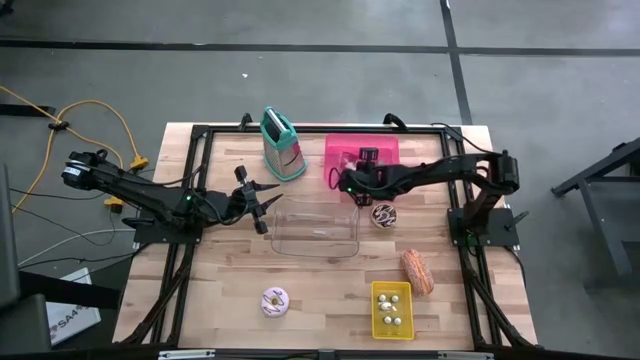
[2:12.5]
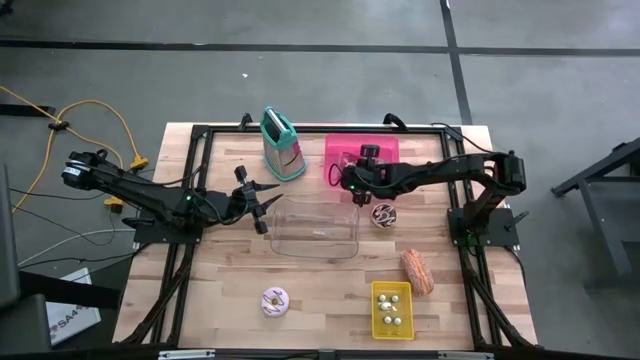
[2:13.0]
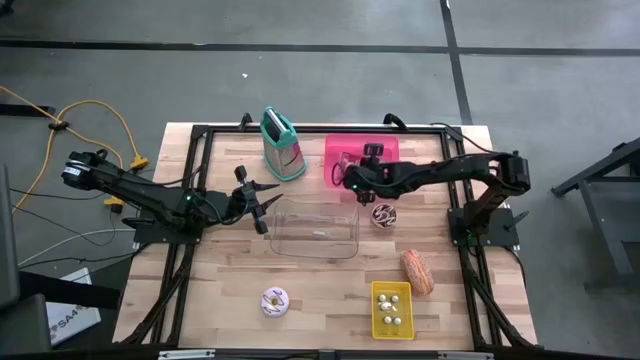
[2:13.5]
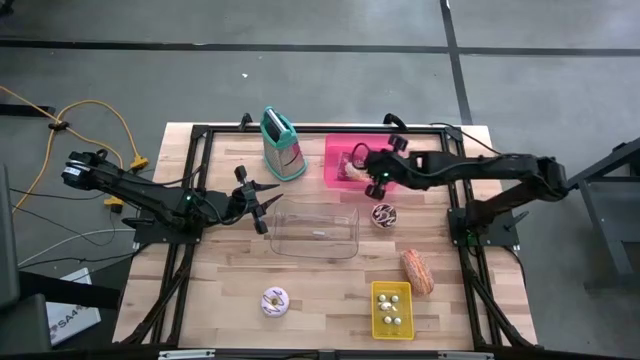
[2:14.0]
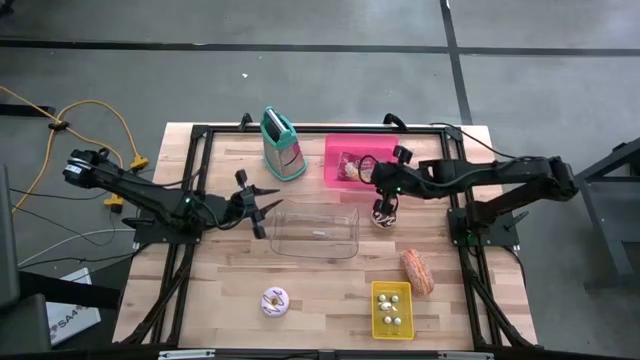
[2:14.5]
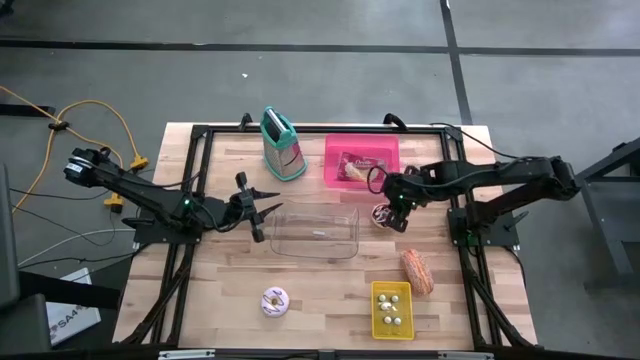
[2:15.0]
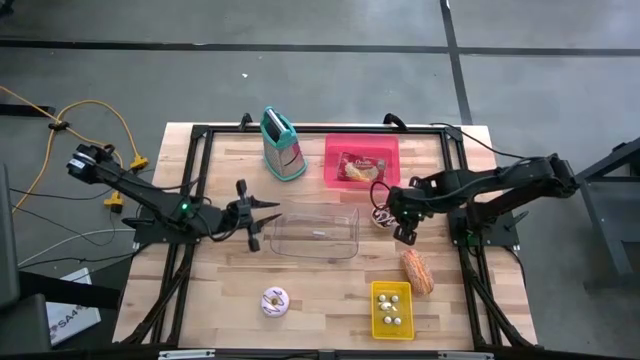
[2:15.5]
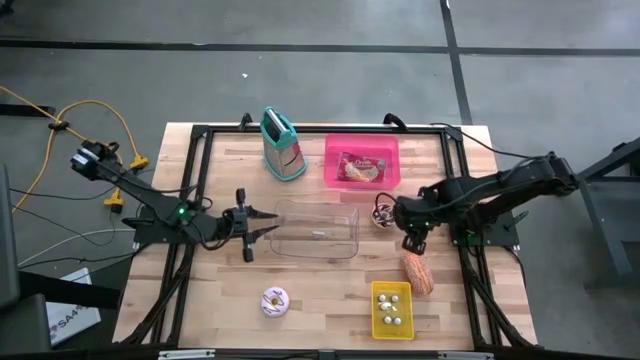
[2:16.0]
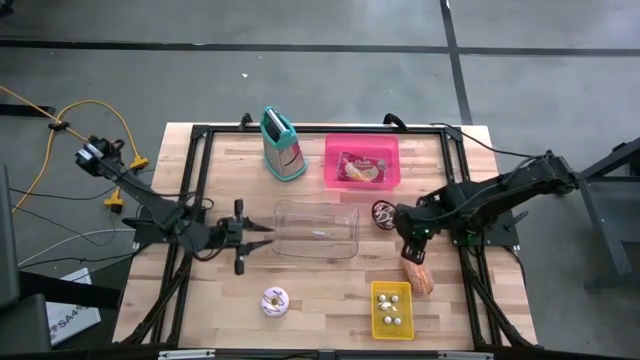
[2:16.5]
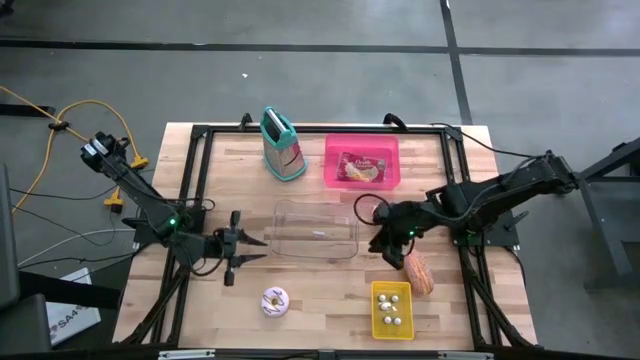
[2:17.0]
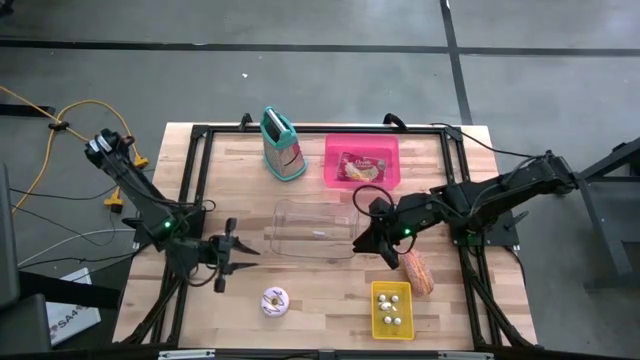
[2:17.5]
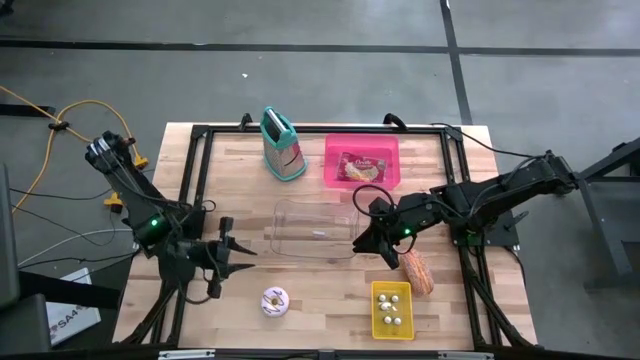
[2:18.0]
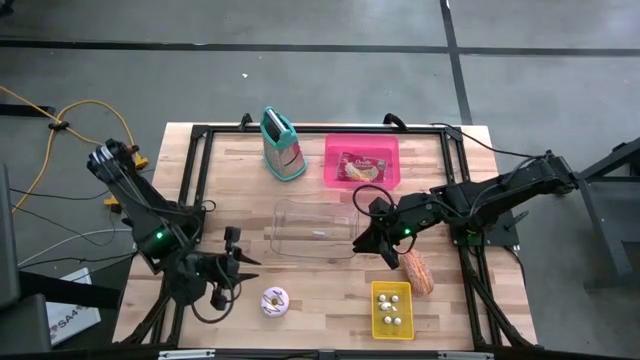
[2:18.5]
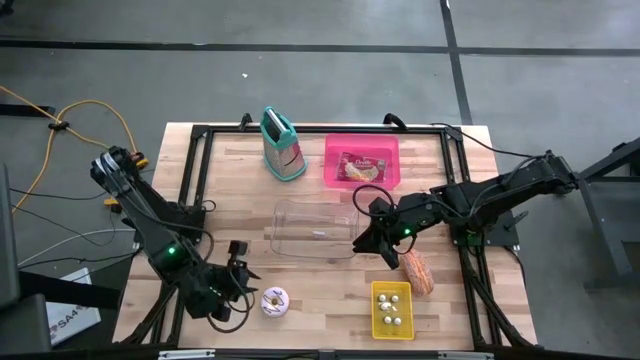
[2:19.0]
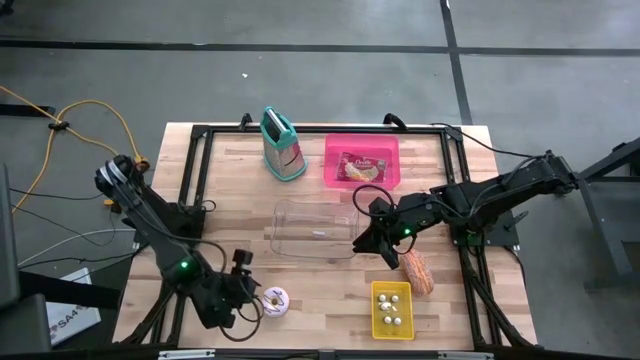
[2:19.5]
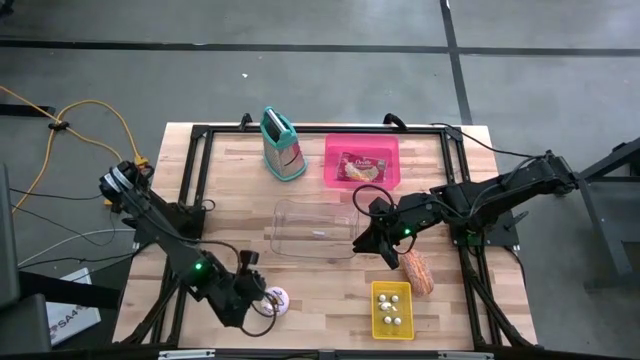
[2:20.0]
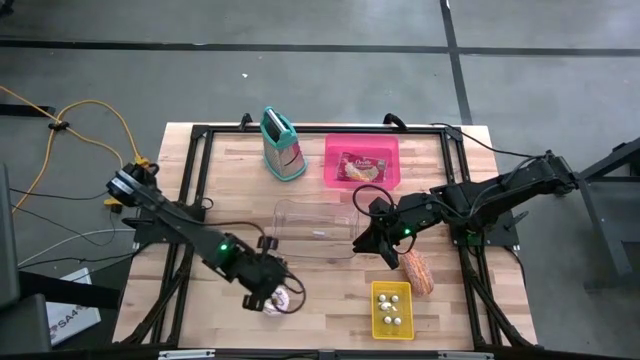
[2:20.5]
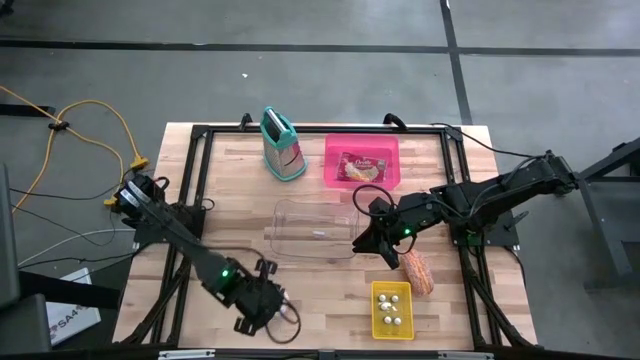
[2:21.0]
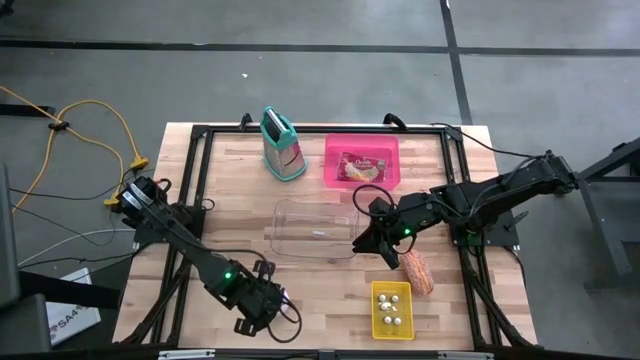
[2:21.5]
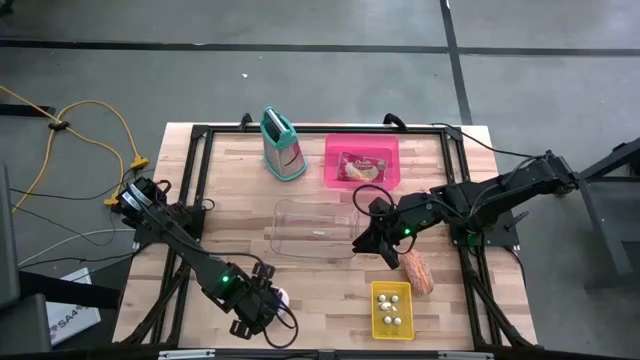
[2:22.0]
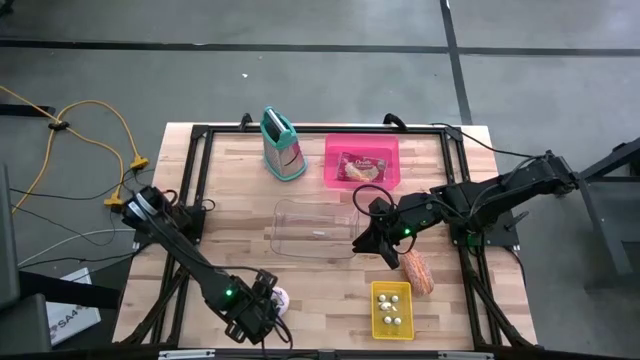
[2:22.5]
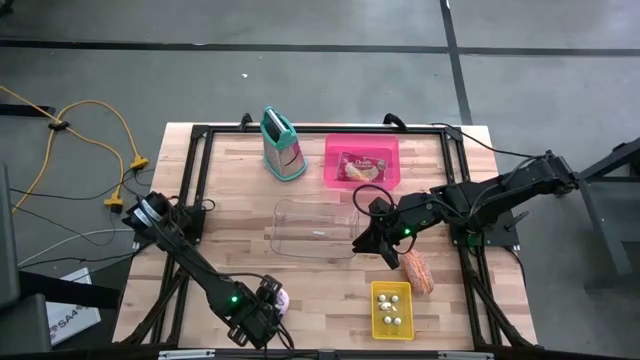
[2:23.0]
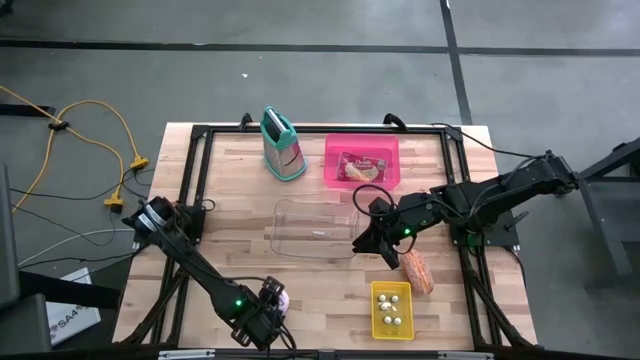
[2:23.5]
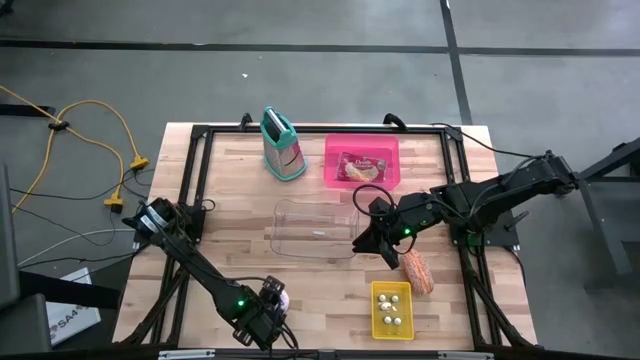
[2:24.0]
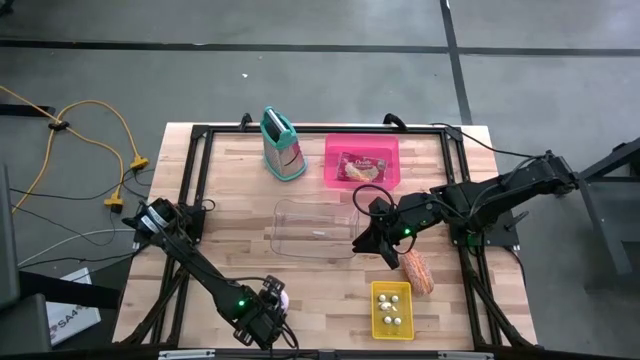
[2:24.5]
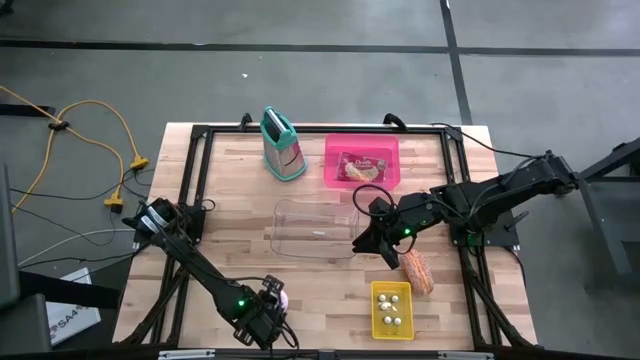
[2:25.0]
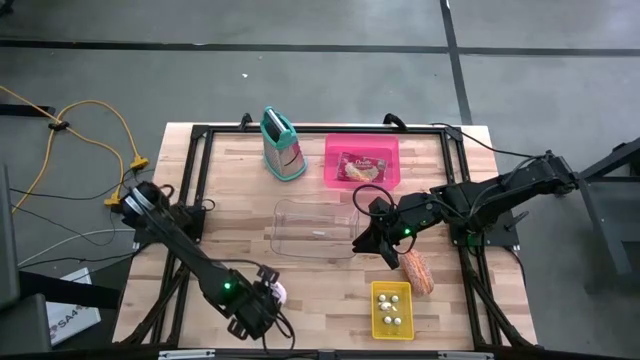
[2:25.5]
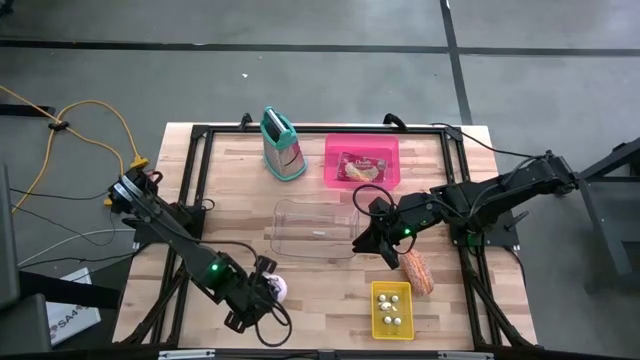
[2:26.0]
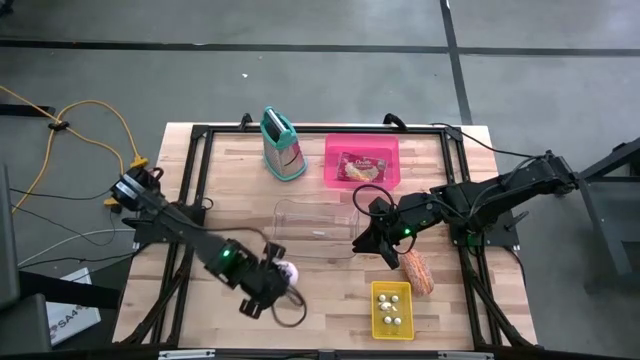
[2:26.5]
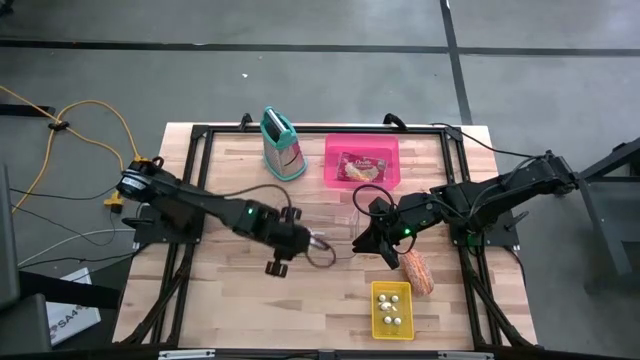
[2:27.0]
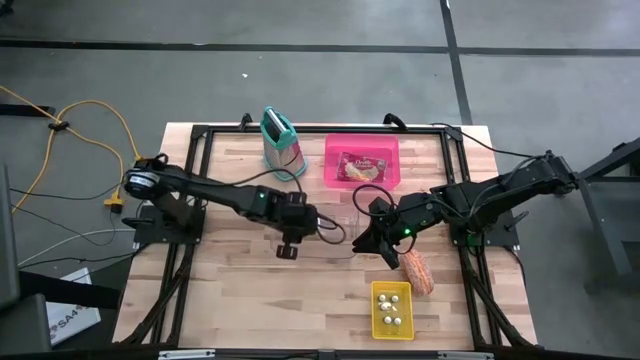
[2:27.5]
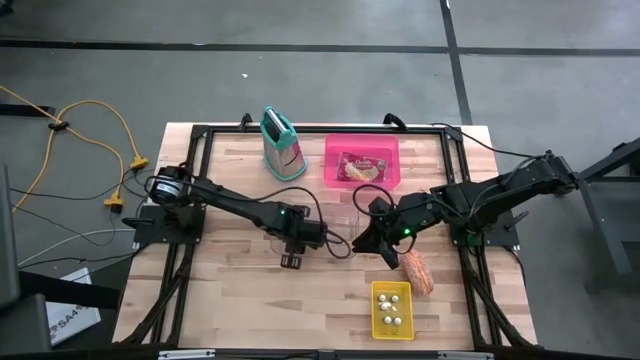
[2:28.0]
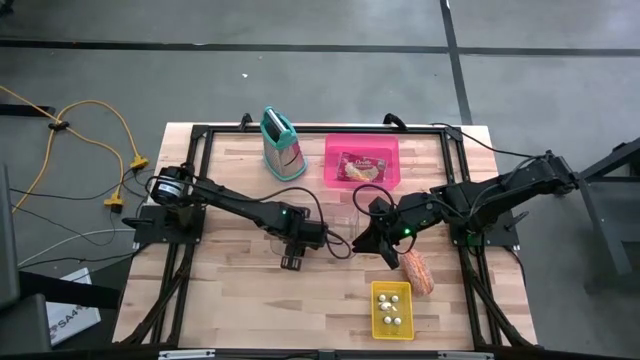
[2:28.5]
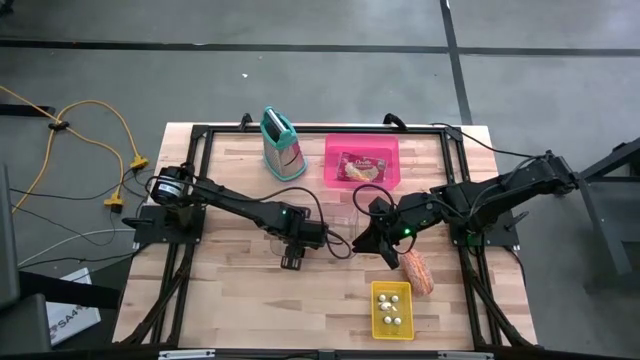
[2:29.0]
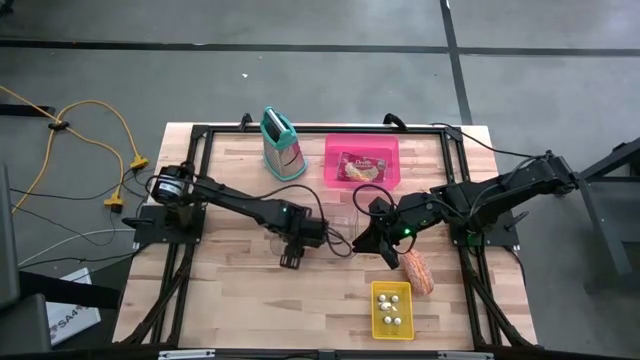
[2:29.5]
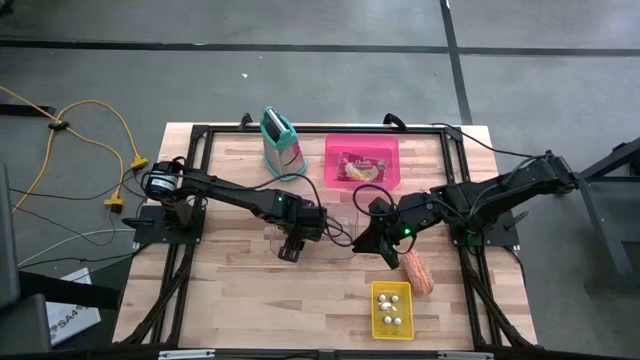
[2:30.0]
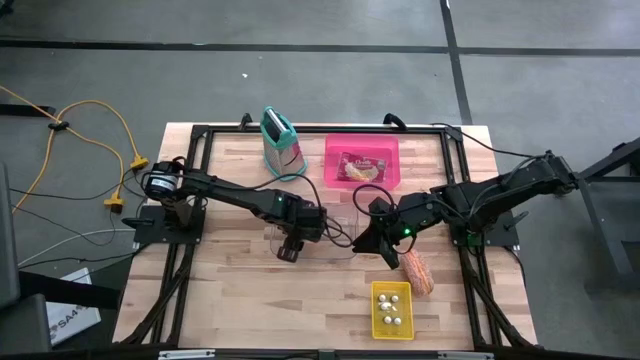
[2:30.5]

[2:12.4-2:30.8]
Put the pink donut into the transparent bin
